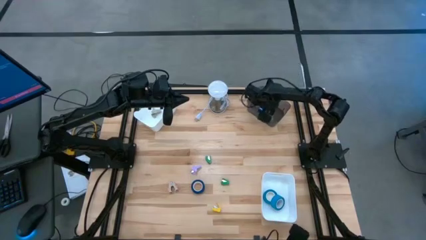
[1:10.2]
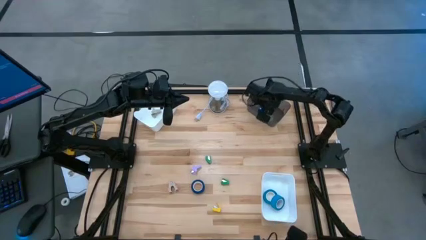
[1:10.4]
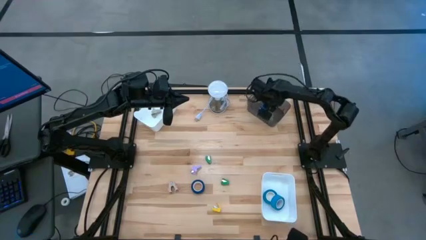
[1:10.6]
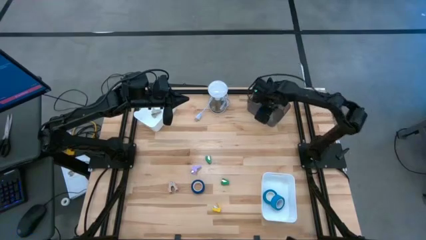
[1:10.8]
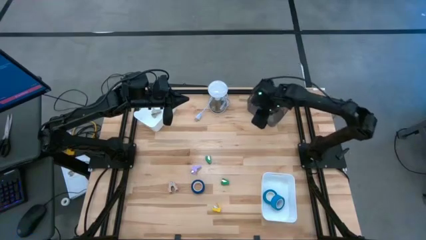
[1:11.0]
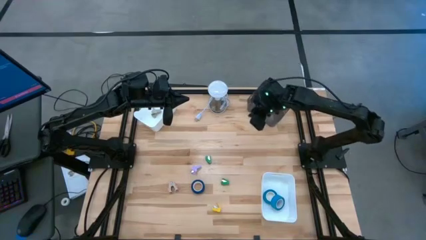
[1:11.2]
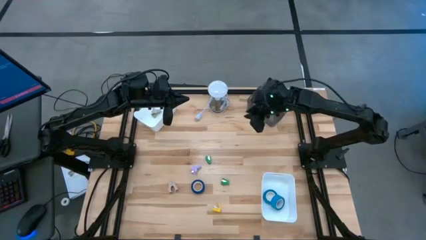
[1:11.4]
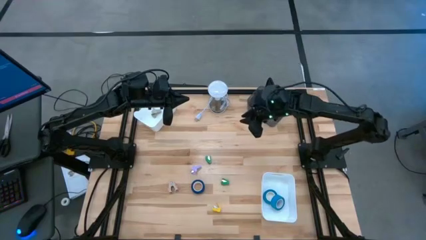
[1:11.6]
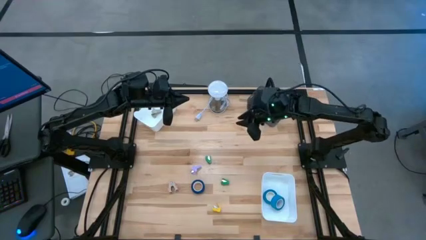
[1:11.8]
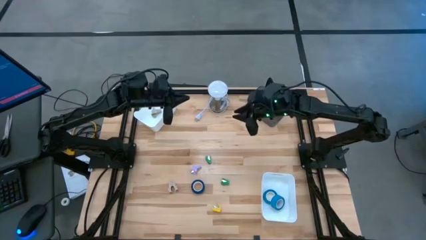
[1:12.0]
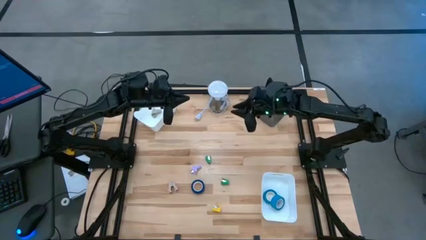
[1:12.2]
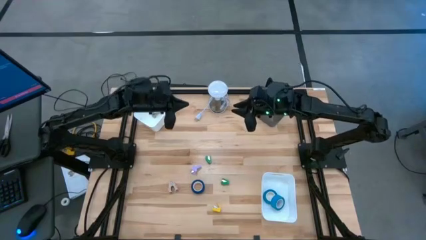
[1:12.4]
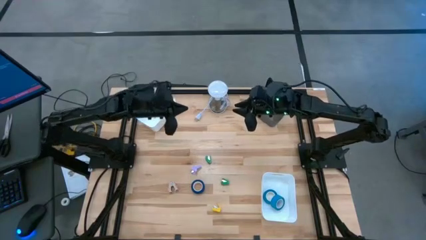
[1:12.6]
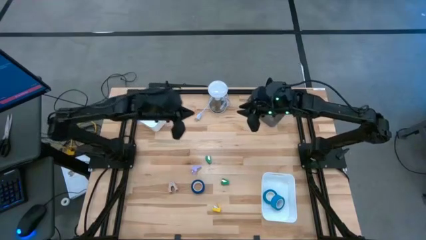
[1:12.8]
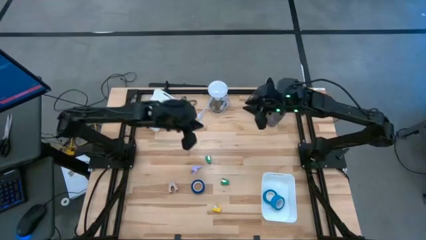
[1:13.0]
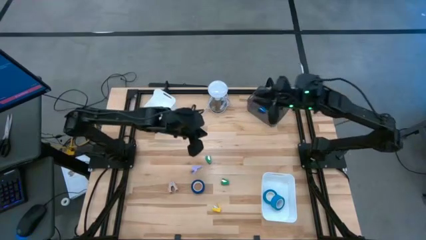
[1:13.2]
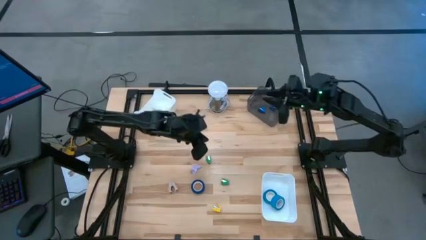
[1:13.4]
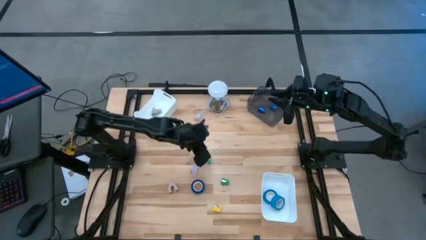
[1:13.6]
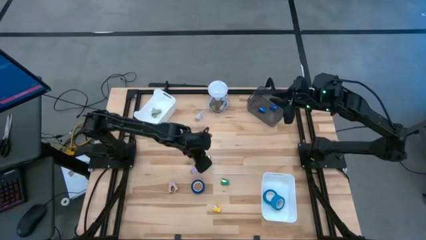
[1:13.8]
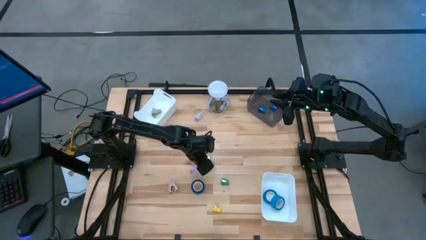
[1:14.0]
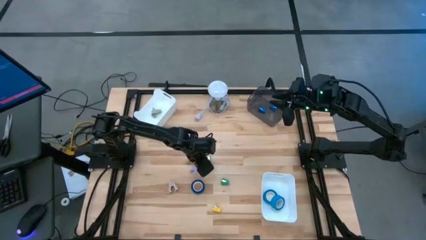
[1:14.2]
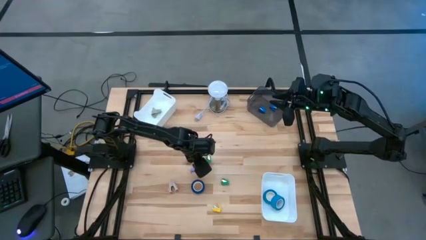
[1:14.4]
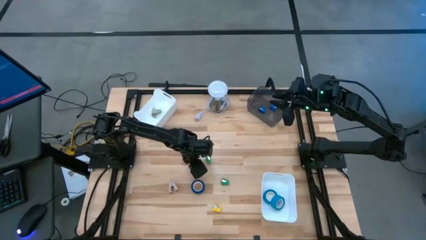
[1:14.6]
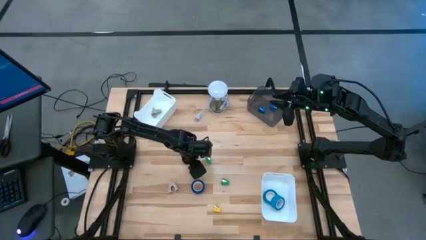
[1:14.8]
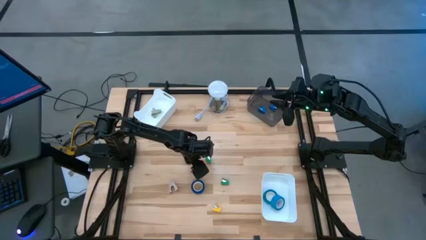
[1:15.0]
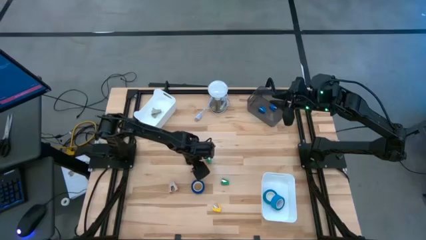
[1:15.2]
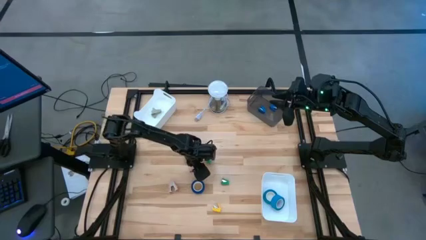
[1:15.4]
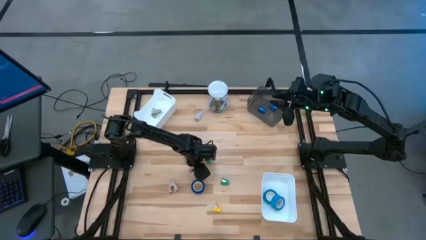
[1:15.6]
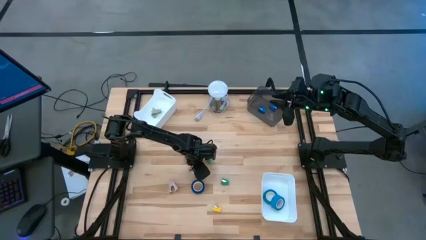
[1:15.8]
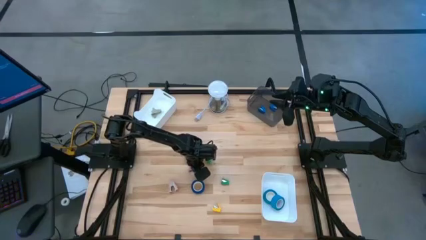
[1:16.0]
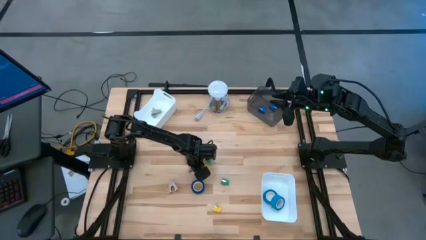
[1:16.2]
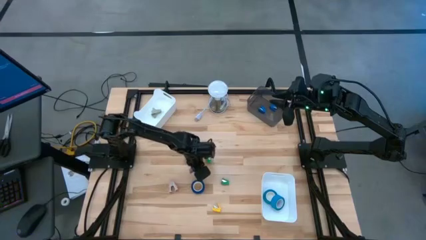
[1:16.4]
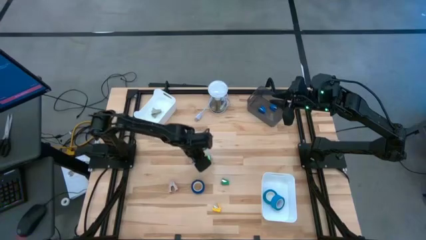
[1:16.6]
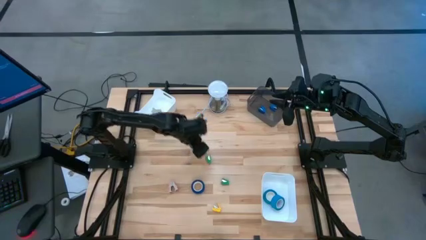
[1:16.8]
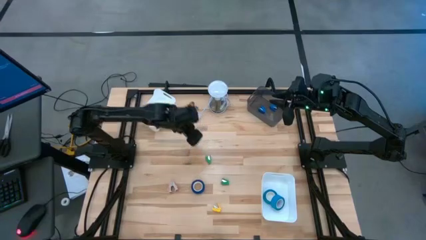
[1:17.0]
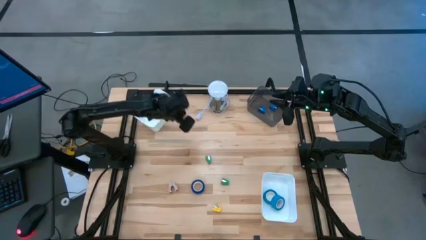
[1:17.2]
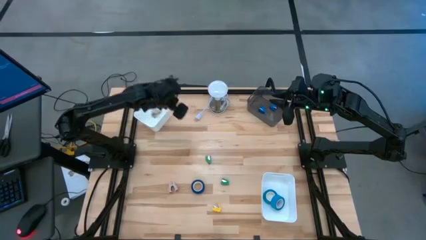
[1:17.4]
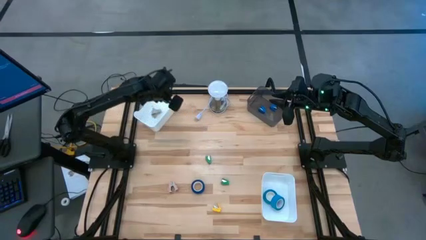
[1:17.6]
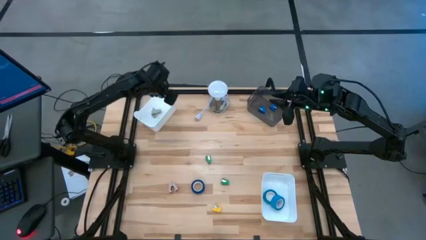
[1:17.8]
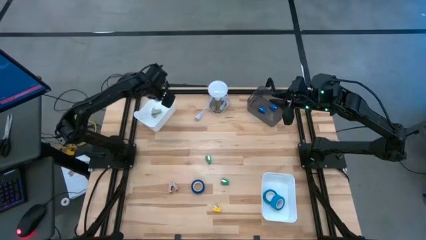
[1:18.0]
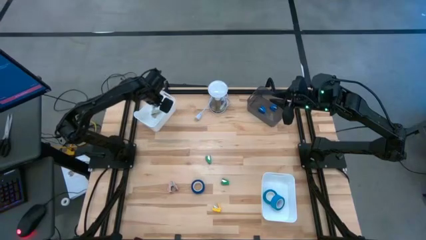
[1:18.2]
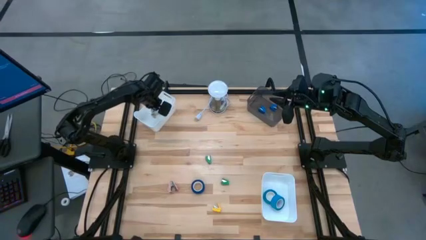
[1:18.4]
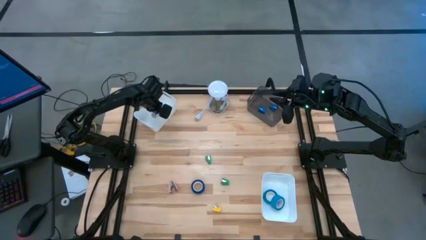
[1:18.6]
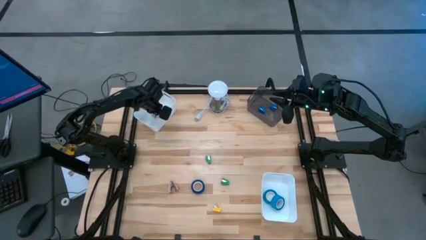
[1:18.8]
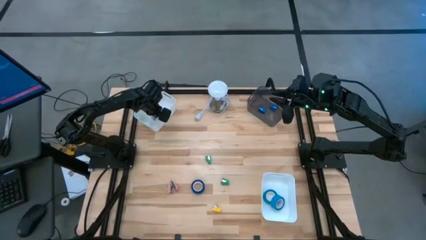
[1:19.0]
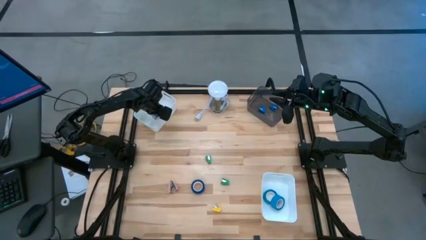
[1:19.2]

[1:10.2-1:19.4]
Task: Pick and place Stapler, Stapler remover, tape
Put the purple staple remover into the top white bin

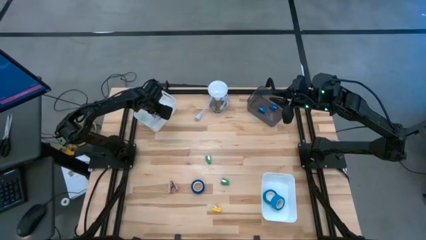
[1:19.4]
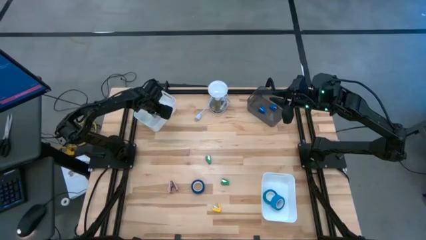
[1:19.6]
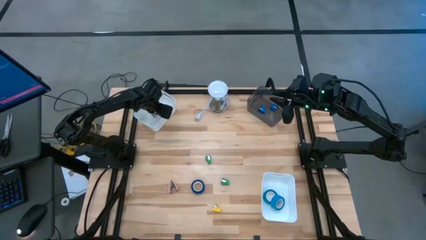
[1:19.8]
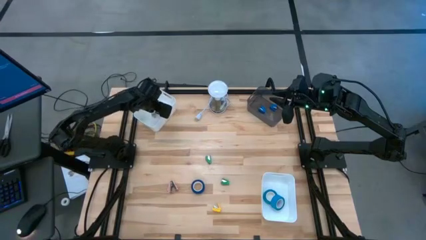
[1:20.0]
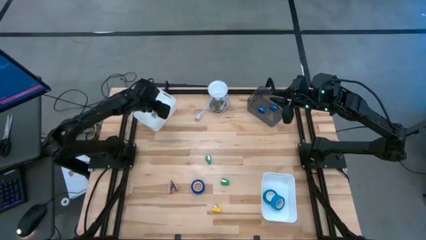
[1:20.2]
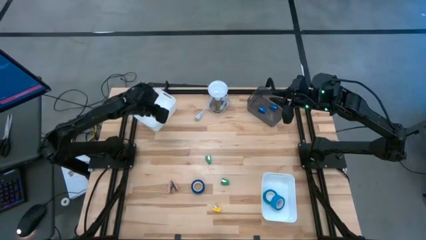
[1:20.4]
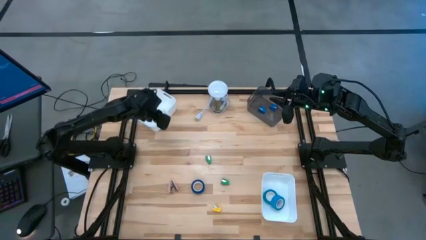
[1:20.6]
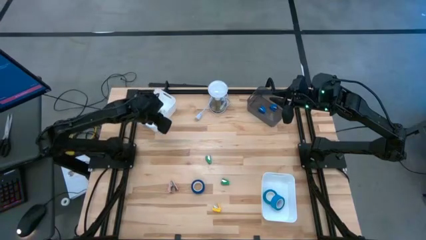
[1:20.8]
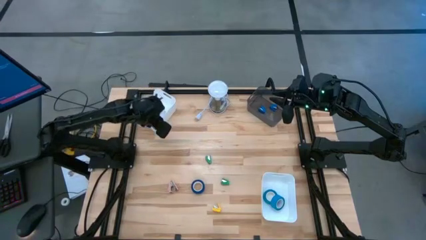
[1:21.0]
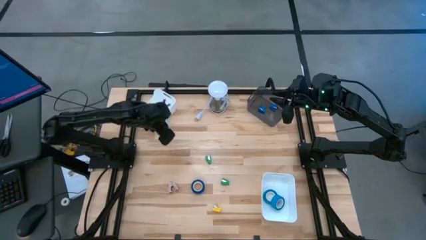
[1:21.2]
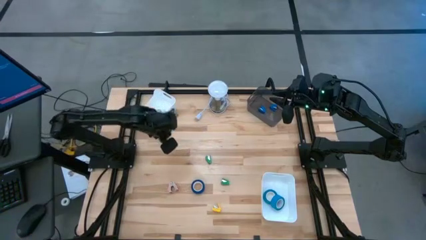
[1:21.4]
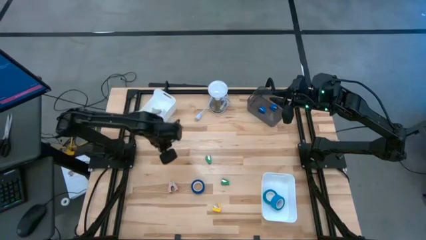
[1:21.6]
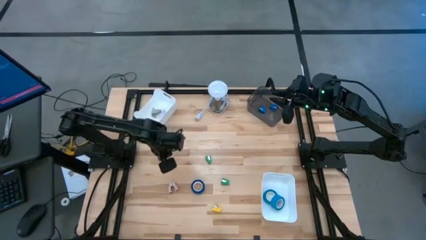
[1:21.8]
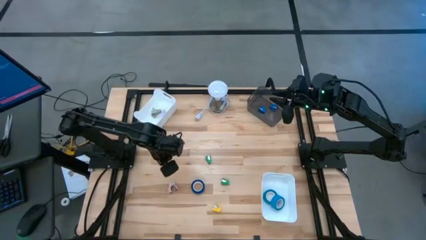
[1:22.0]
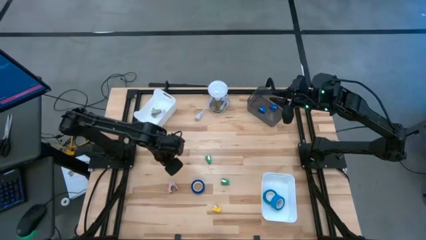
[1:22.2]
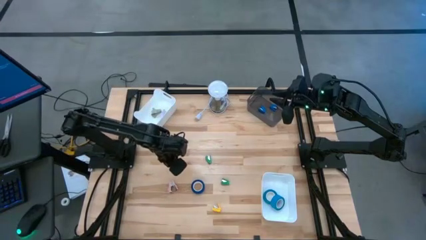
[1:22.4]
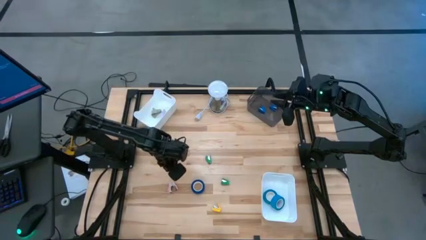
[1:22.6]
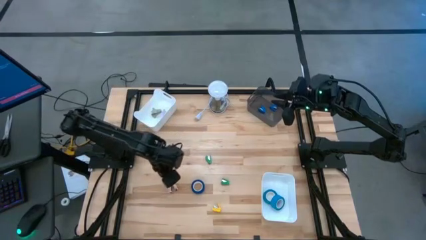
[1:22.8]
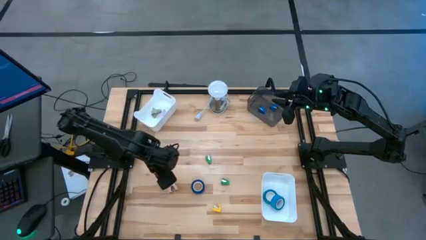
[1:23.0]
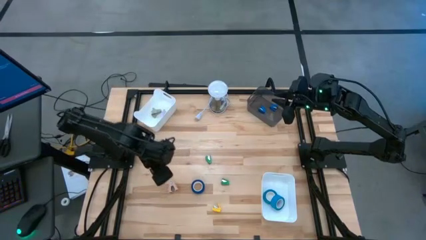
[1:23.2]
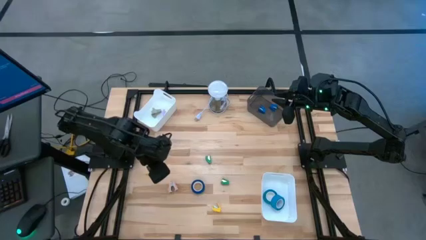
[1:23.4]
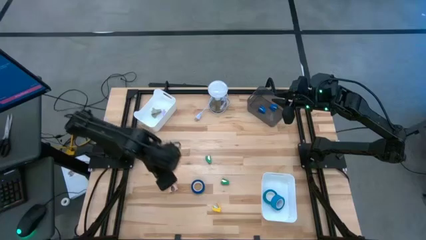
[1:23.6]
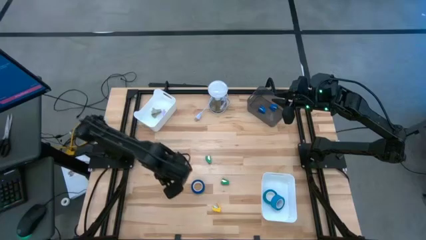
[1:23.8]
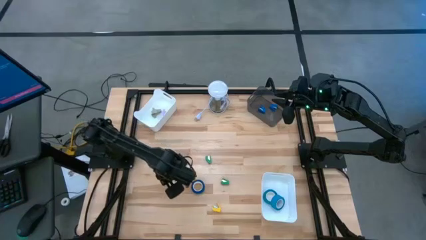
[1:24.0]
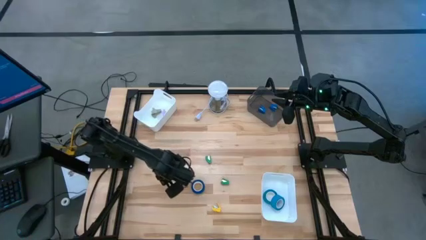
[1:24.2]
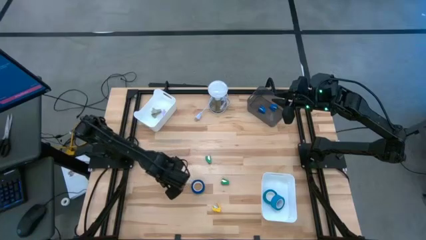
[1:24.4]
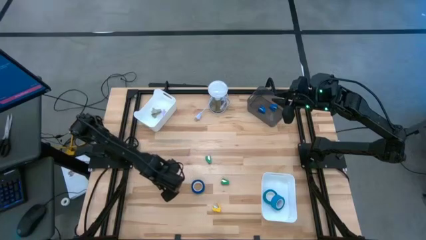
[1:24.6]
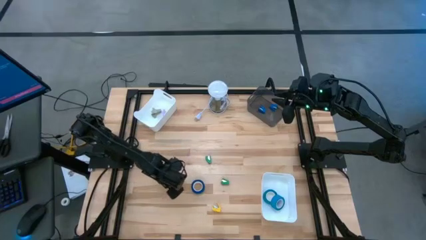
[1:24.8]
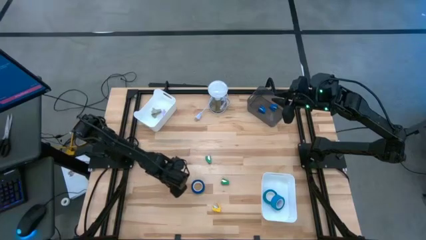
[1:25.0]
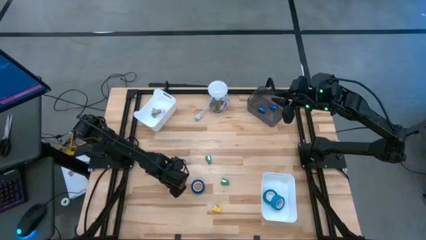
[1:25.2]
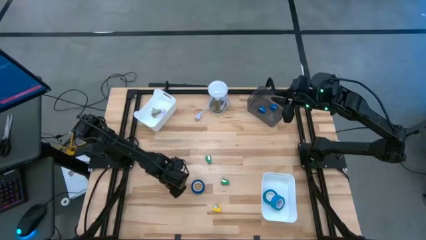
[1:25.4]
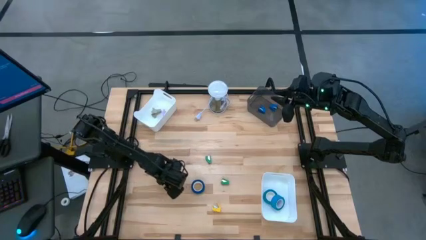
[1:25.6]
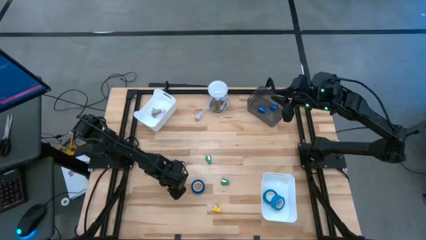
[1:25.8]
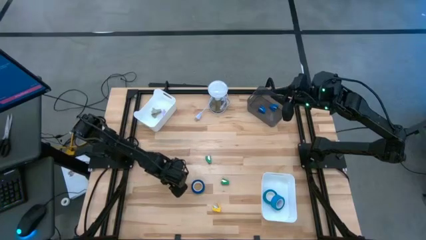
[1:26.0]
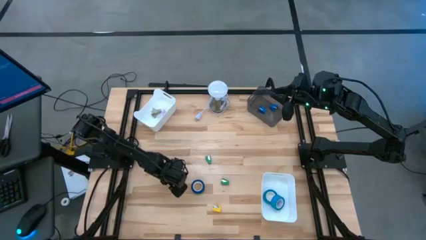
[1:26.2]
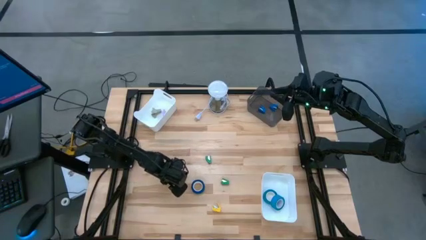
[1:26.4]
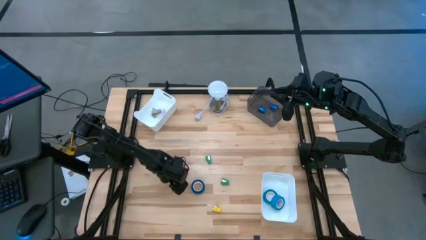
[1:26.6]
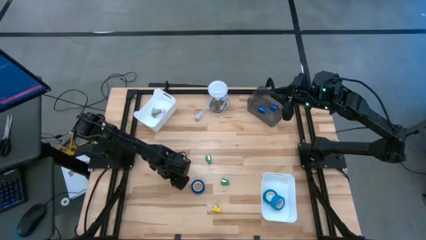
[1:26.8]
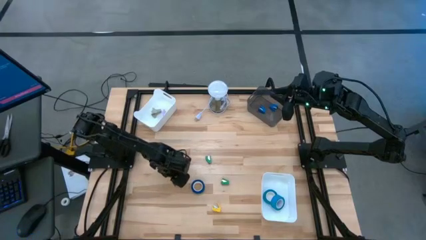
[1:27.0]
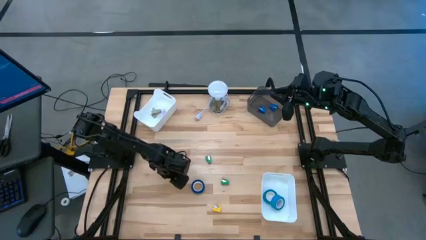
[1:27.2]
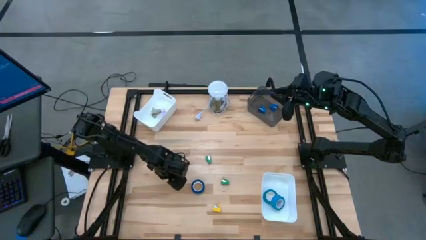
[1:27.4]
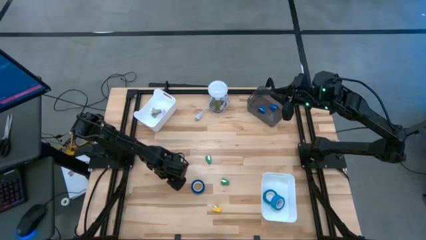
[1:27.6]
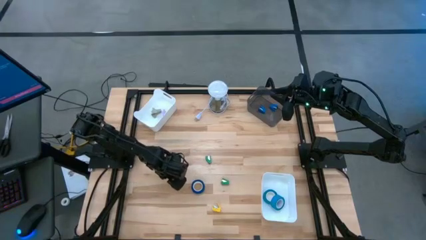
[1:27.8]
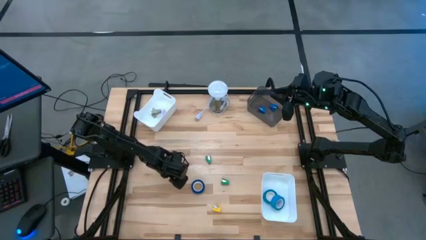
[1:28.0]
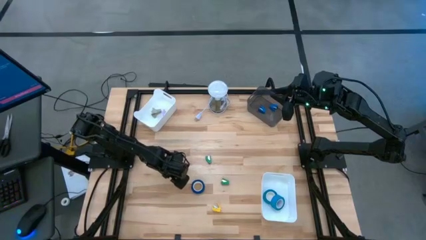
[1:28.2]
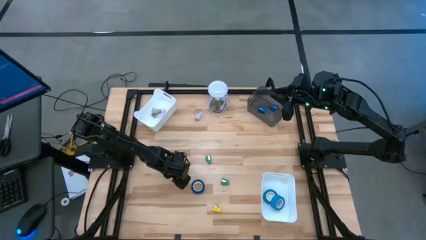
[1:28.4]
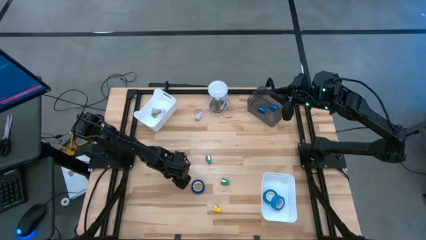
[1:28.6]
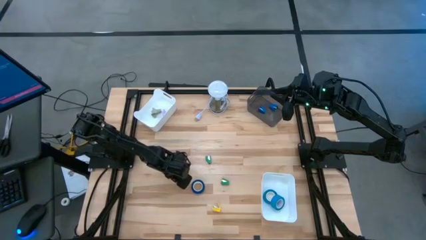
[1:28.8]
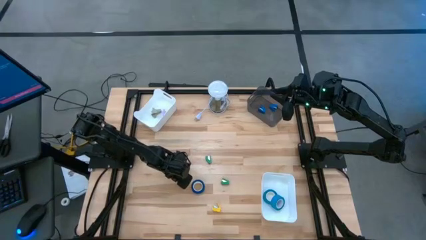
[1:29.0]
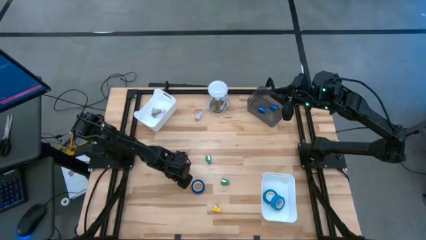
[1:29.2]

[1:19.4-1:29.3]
Put the pink staple remover into the top white bin
